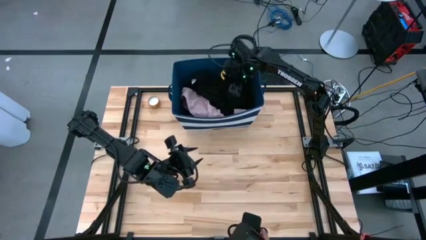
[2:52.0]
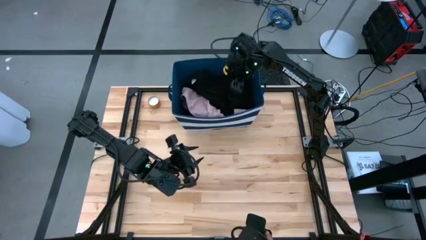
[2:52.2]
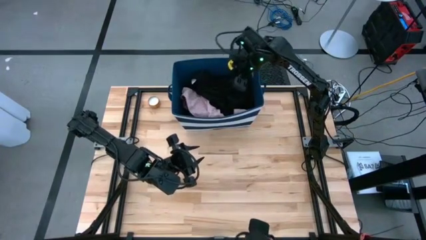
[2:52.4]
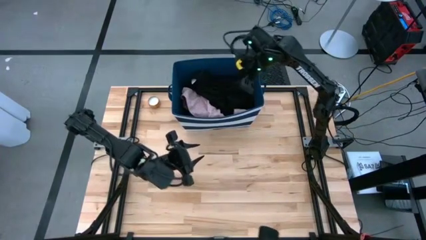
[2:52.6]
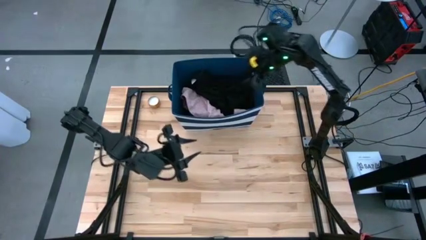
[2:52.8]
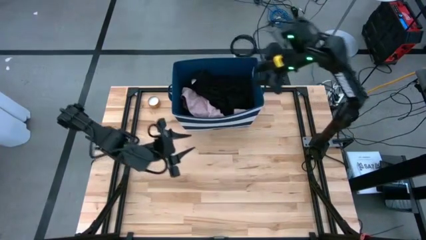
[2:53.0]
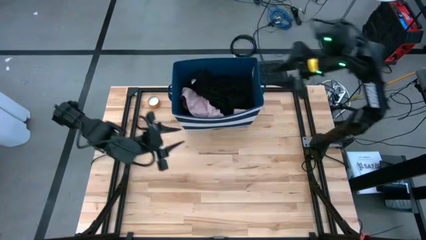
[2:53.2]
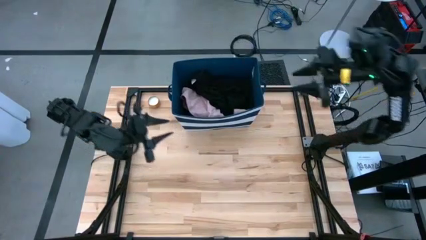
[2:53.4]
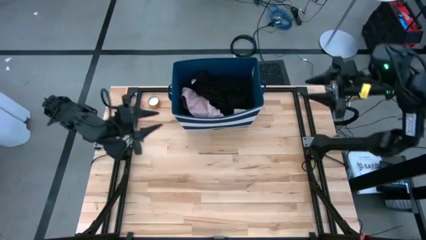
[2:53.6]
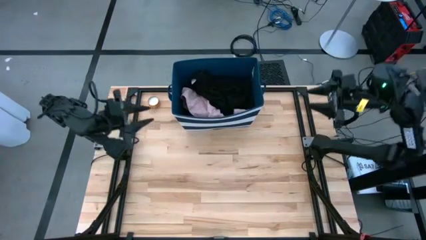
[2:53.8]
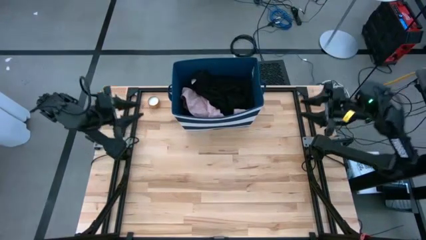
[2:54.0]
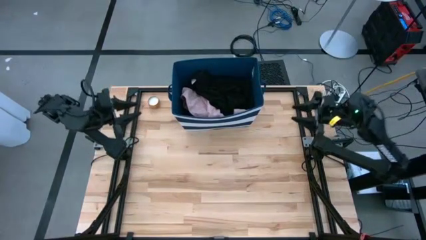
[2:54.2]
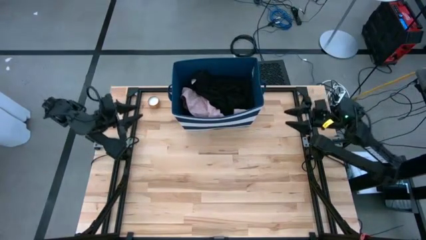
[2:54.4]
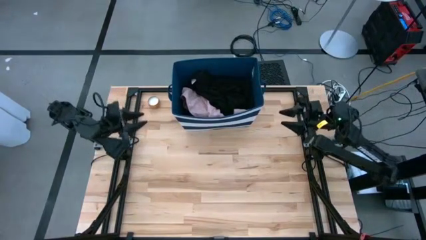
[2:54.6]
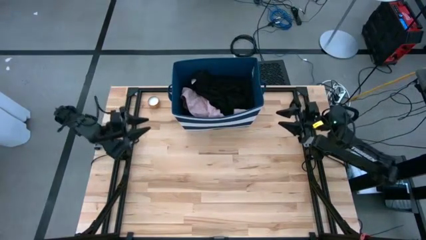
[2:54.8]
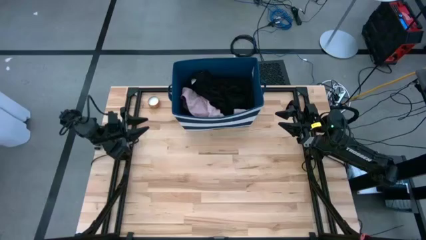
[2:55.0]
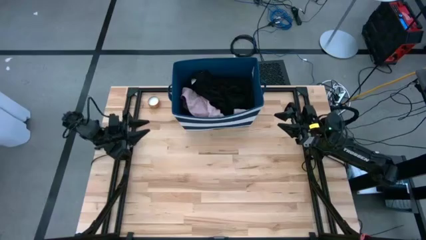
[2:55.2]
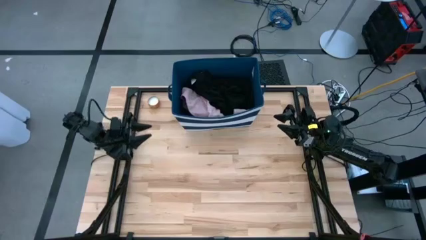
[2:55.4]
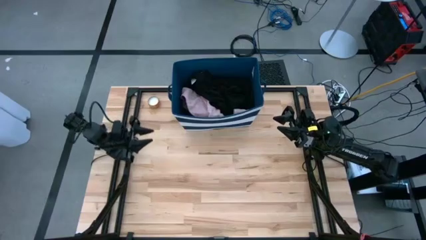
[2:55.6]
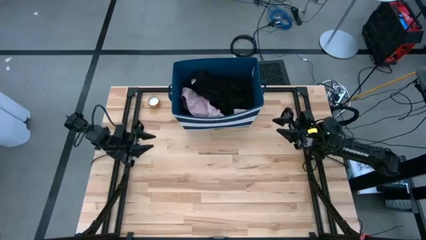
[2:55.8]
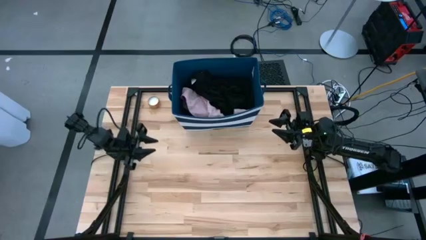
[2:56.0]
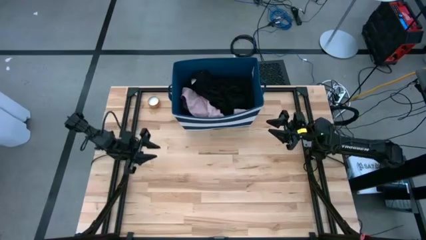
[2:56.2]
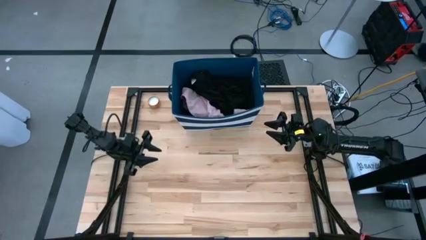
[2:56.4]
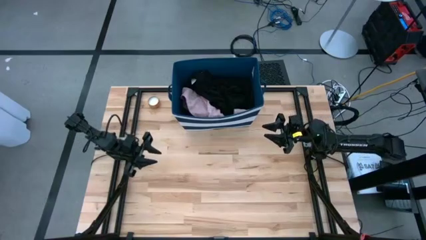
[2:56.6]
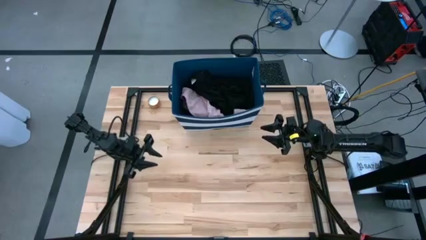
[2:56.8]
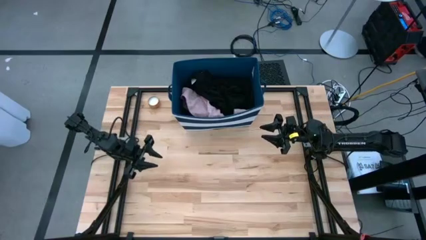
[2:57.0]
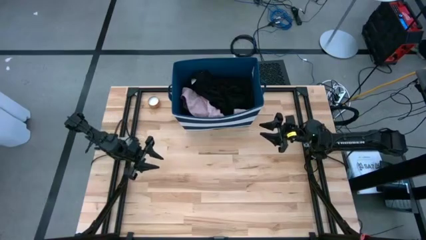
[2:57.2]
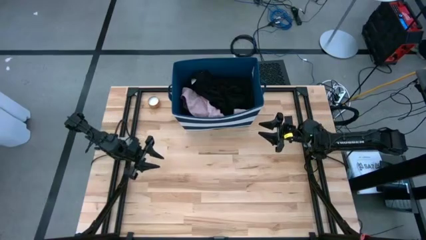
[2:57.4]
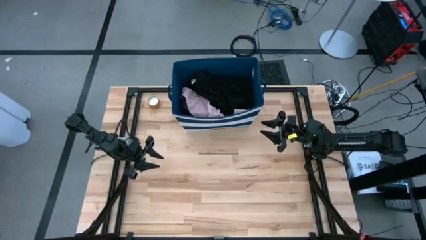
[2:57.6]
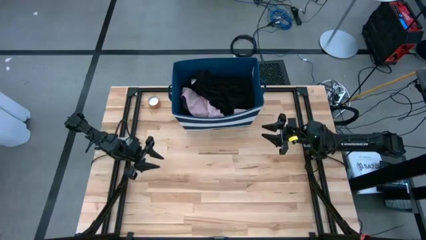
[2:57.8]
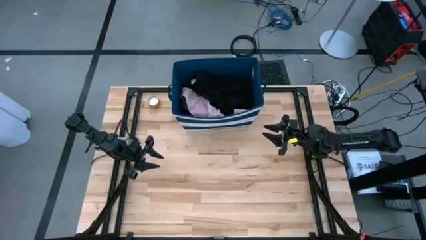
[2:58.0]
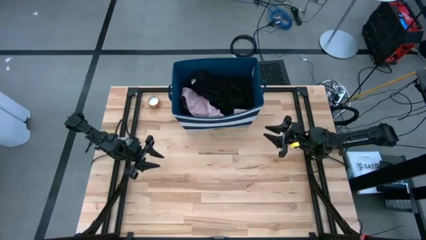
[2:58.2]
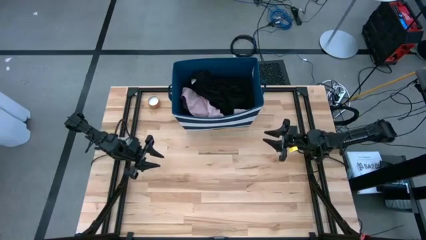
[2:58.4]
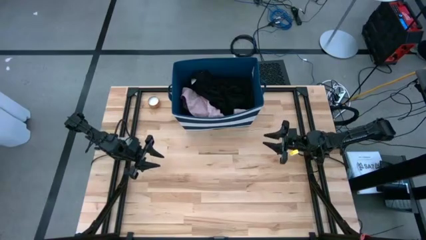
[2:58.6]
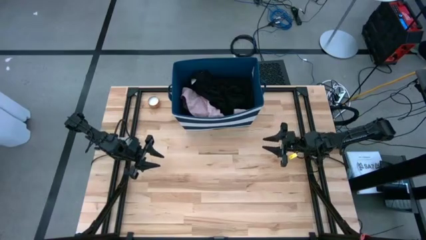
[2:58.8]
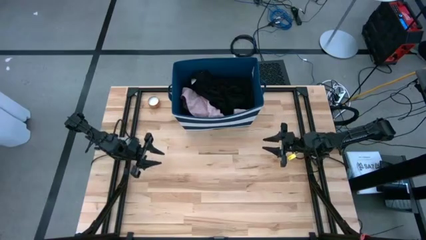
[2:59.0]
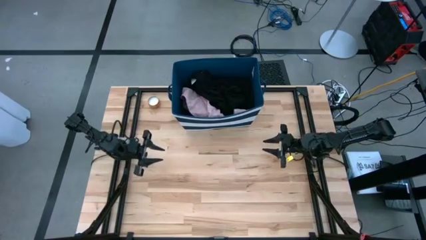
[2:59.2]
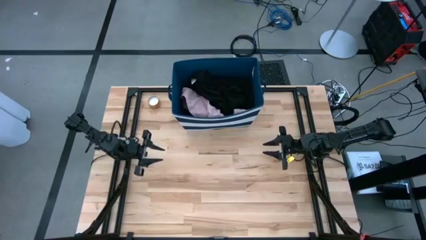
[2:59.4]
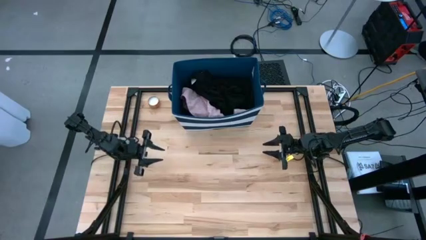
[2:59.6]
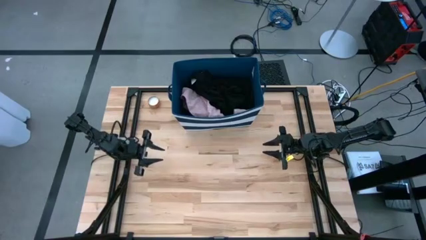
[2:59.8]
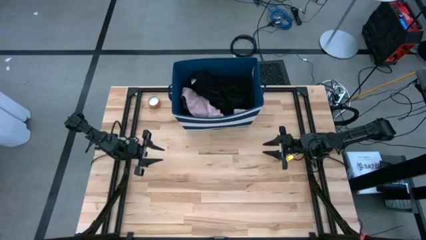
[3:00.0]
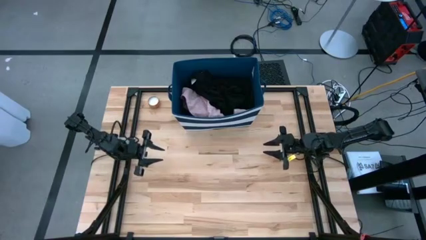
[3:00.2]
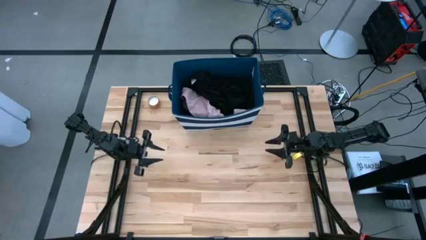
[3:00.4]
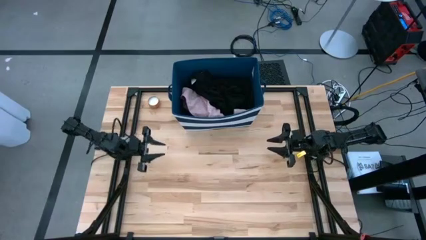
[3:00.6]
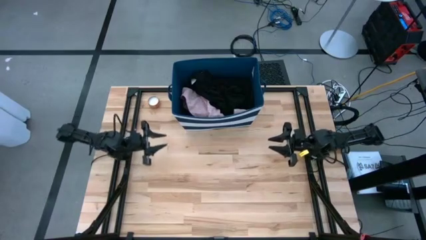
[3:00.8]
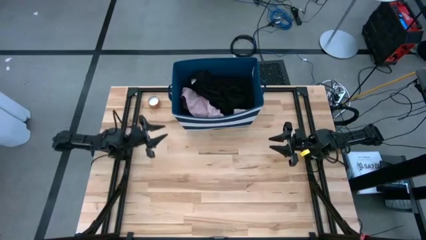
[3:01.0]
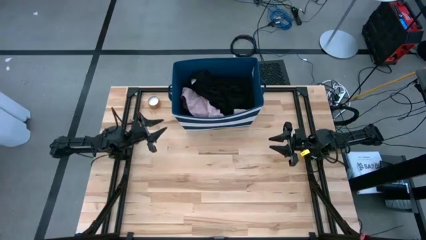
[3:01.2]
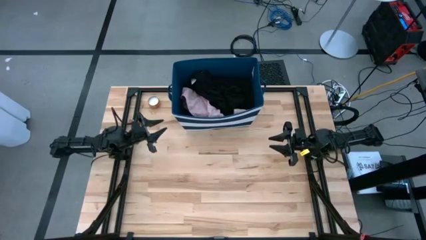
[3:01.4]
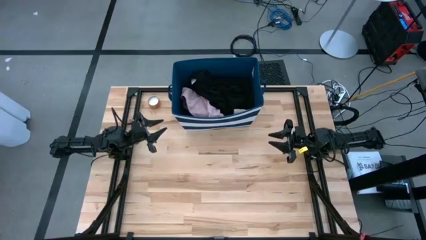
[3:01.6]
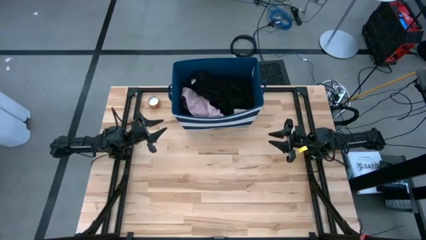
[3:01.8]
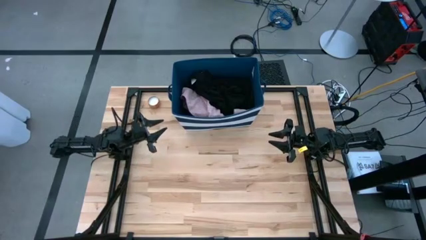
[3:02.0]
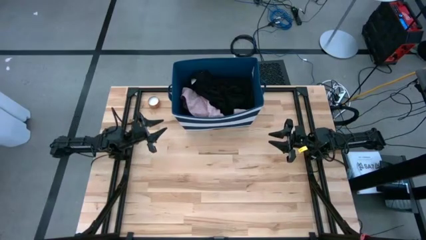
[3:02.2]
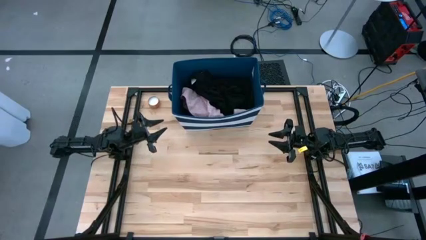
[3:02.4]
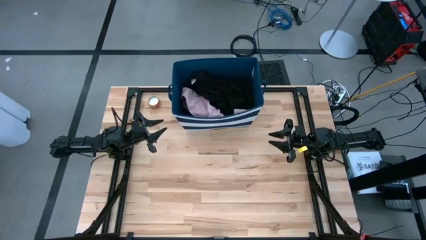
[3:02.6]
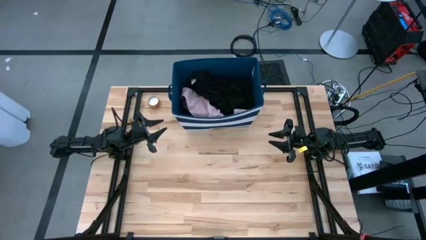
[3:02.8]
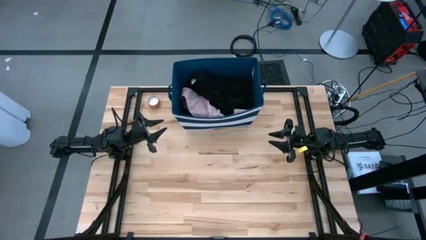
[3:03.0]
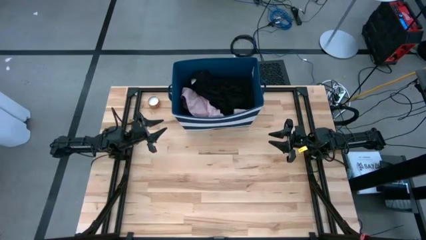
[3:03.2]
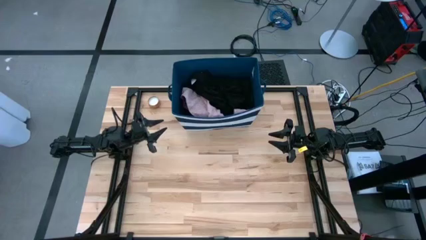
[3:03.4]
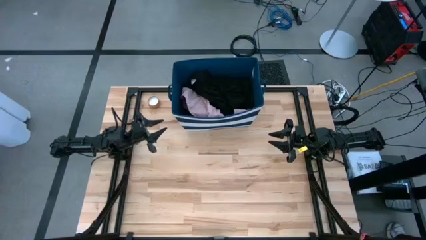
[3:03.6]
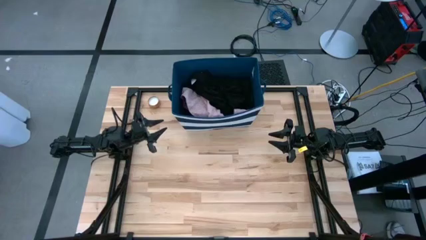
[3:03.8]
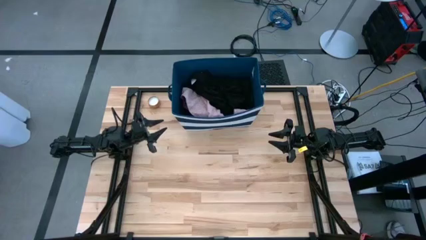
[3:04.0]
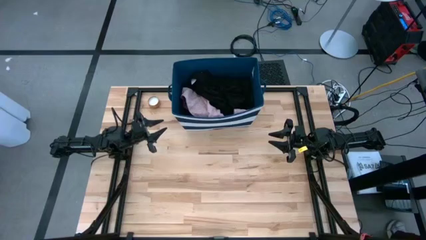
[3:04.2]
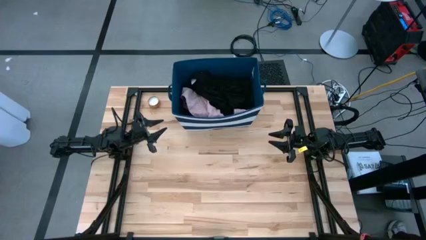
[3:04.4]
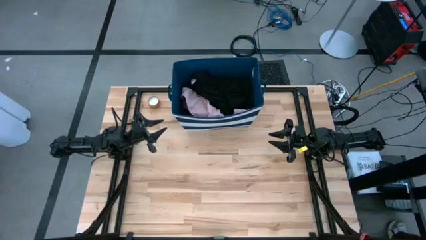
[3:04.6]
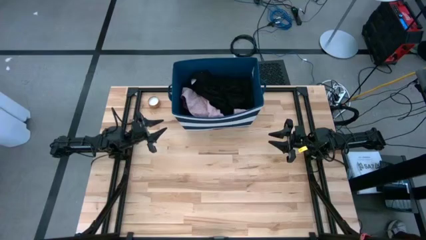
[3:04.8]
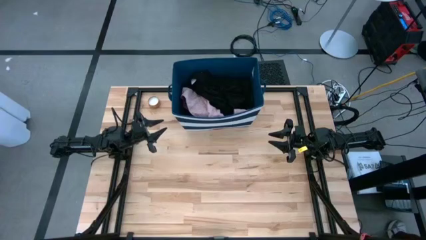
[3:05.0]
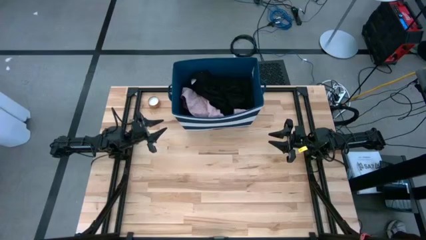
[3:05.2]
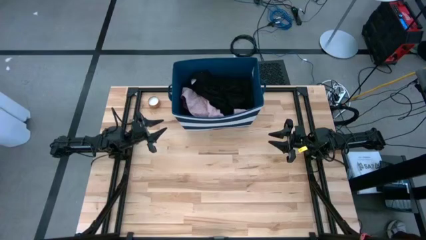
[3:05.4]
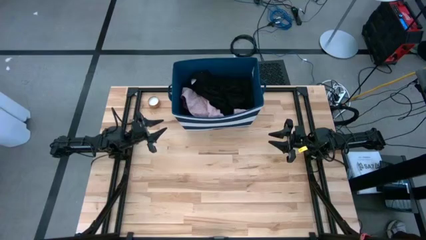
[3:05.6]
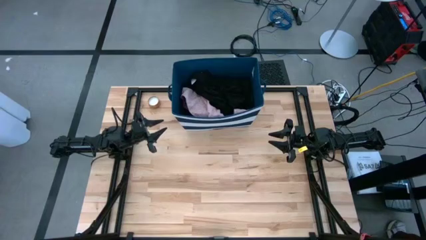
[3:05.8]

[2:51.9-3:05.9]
Task: Sort clothes
Return to Home Position

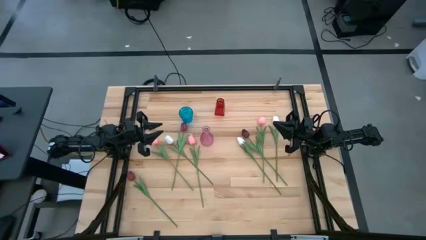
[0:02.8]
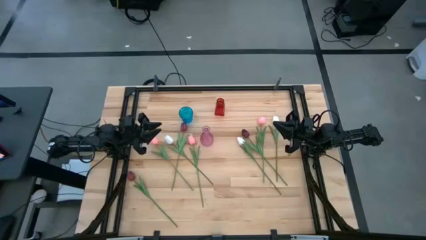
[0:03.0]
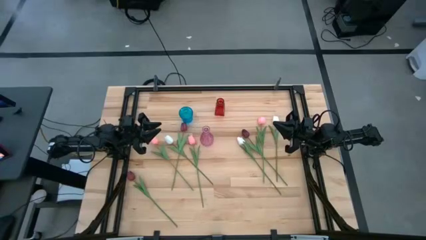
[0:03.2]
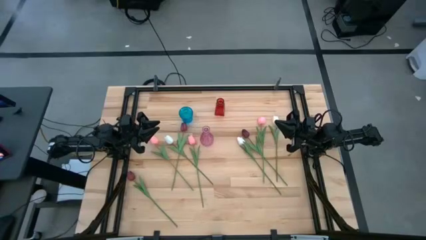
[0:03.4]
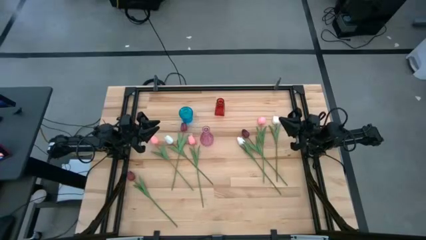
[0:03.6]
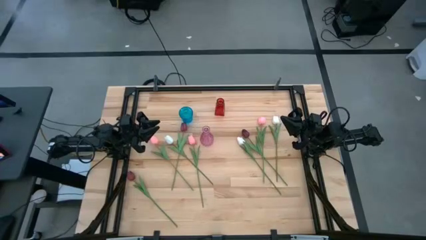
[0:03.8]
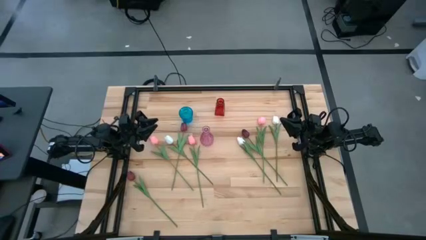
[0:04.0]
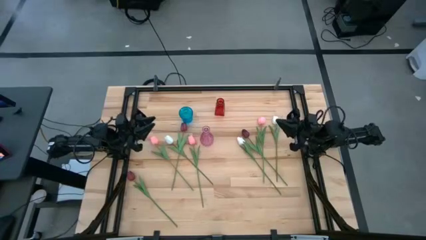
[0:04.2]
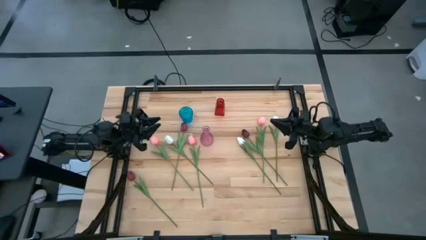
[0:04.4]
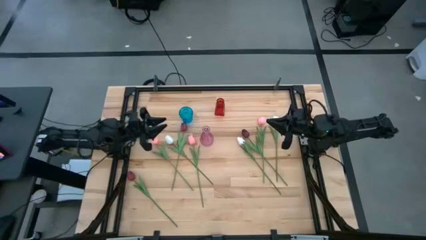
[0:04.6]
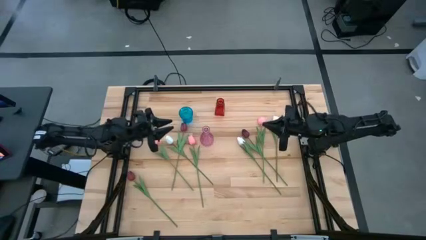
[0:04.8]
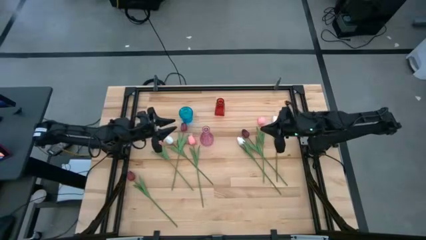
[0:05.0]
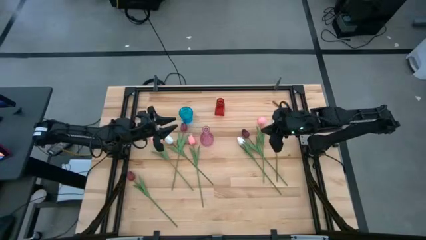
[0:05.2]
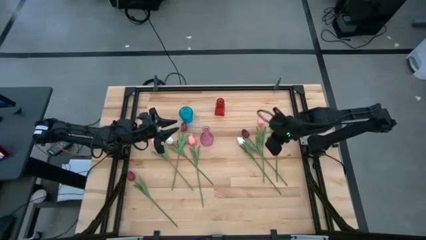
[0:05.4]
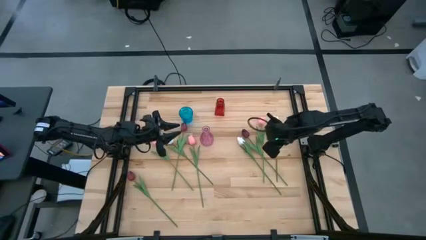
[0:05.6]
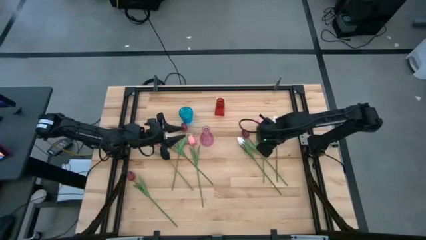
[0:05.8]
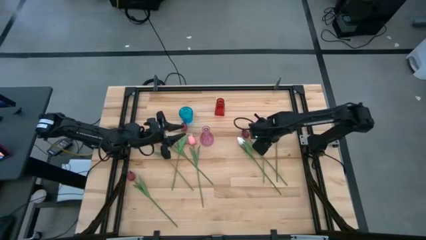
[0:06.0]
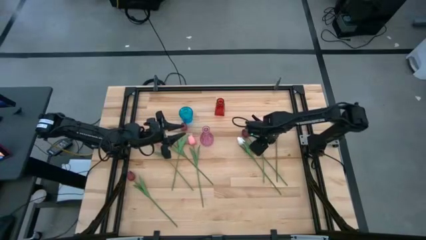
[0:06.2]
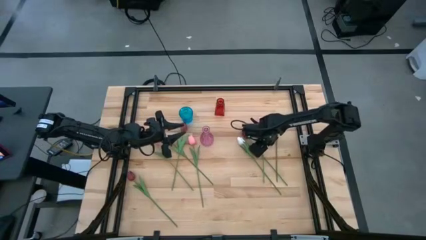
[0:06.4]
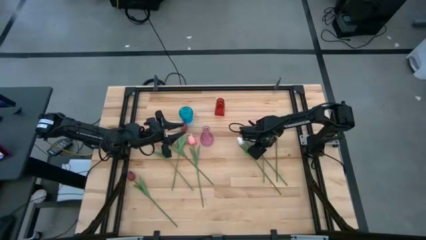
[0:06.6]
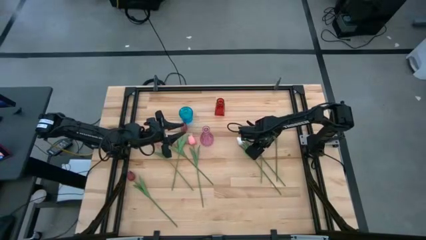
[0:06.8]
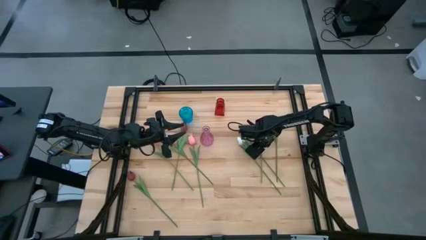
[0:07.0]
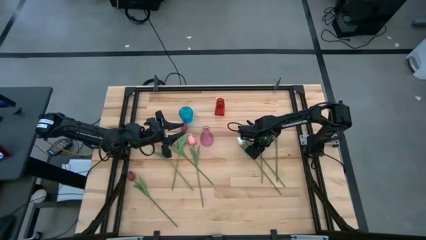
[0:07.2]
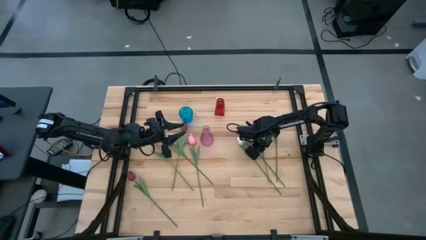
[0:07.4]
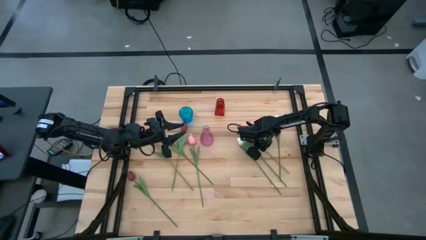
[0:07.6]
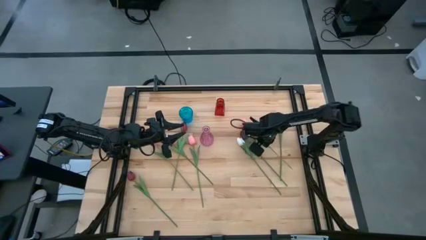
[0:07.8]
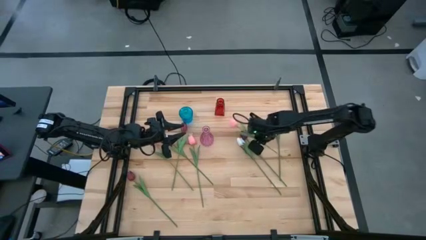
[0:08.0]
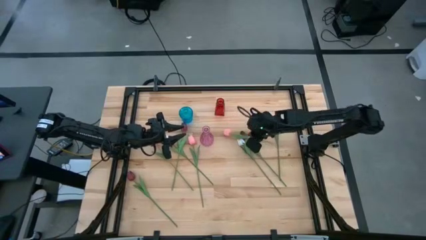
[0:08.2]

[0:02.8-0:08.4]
Task: Sort flowers into vase by color
Put the right pink flower into the red vase
